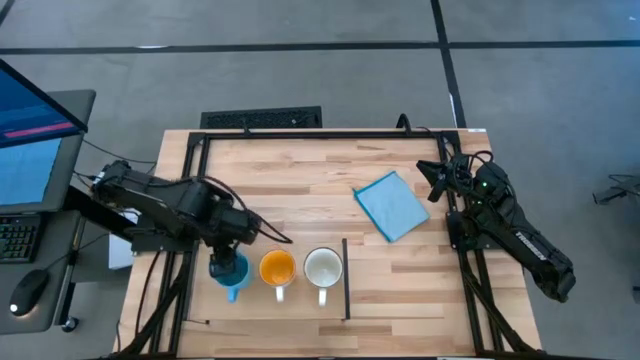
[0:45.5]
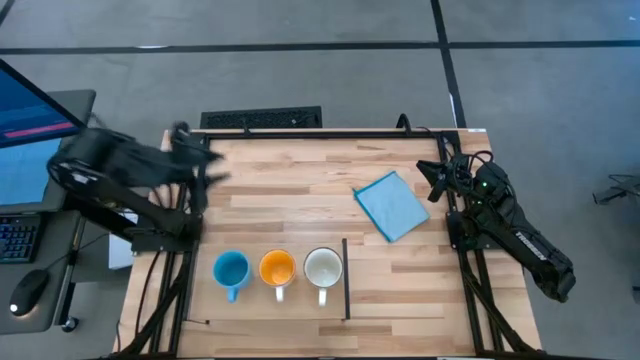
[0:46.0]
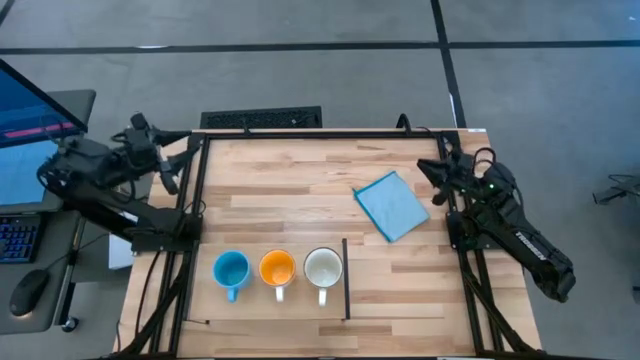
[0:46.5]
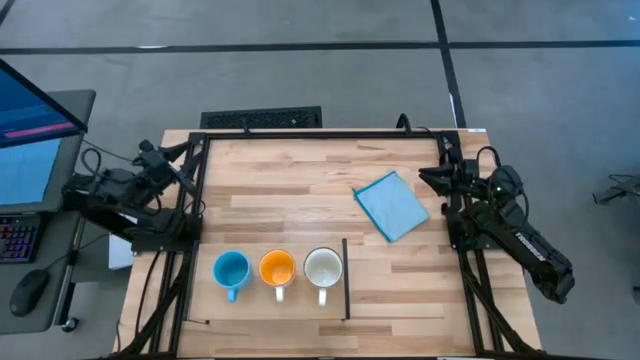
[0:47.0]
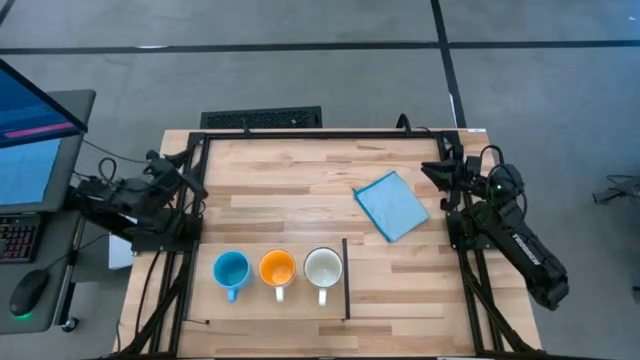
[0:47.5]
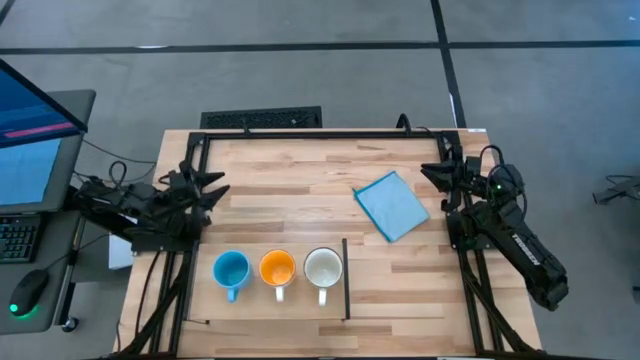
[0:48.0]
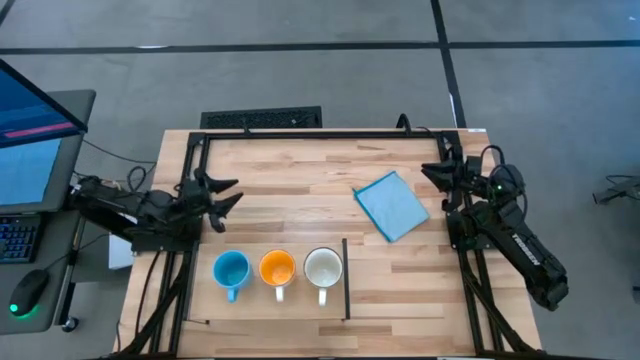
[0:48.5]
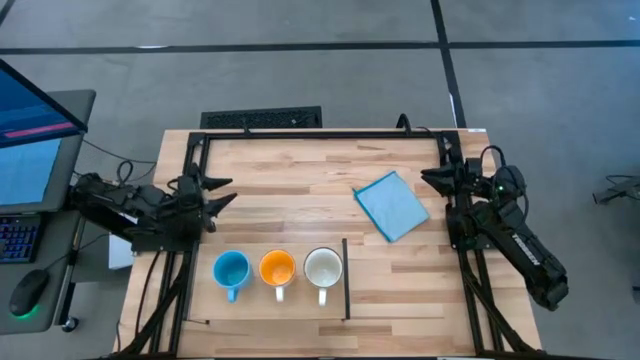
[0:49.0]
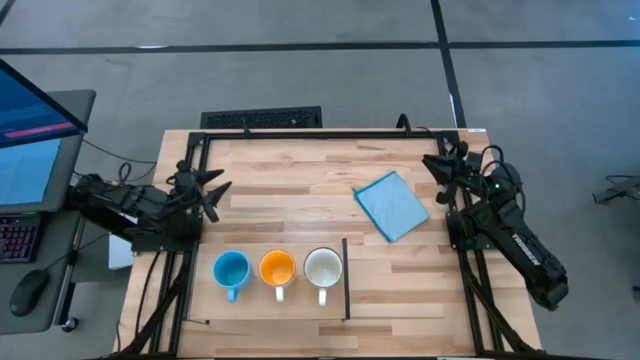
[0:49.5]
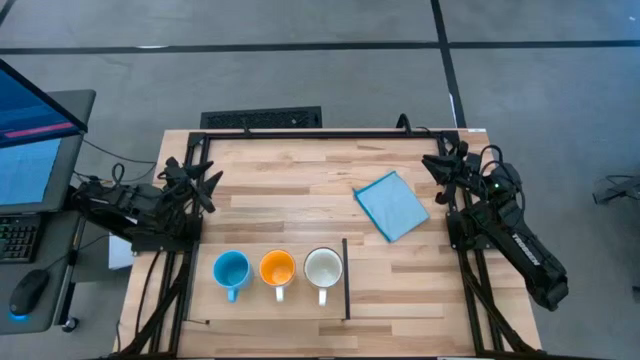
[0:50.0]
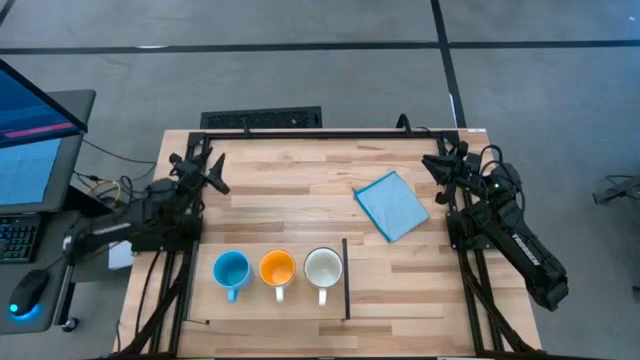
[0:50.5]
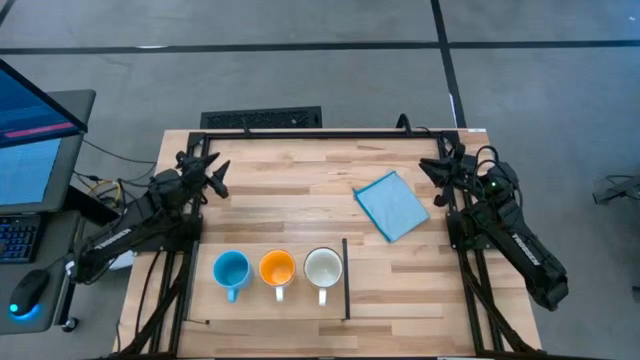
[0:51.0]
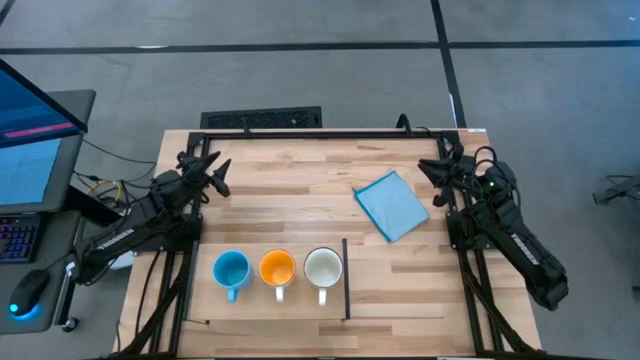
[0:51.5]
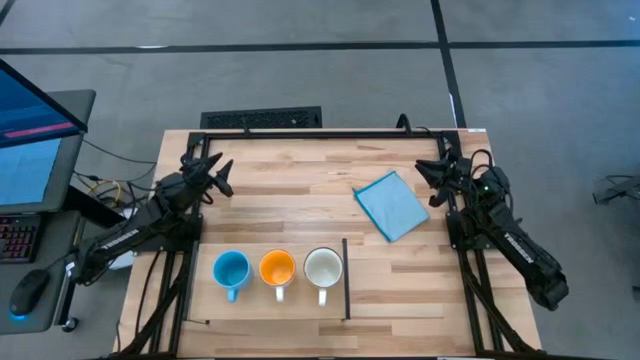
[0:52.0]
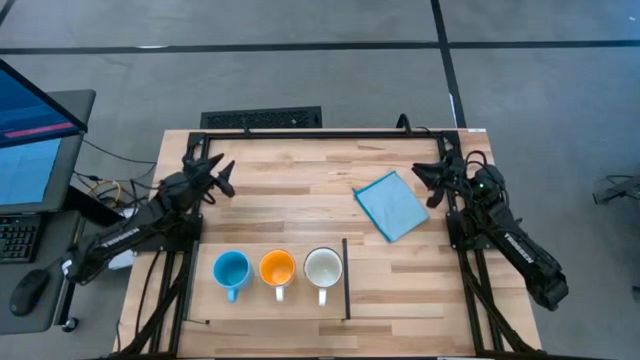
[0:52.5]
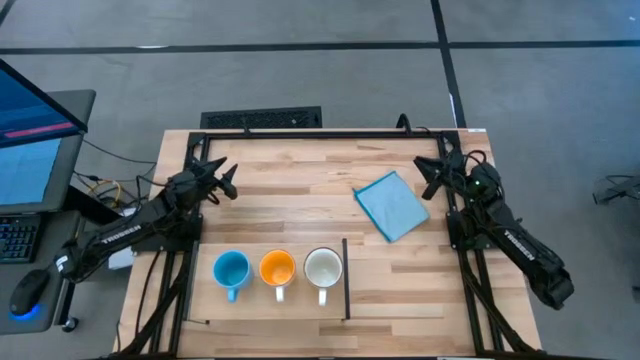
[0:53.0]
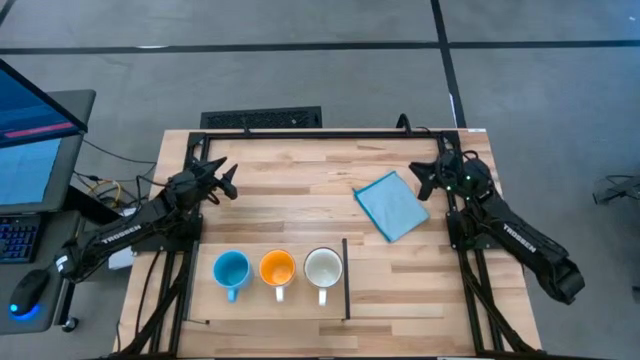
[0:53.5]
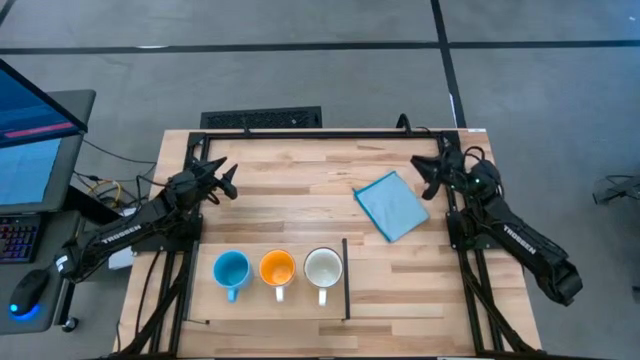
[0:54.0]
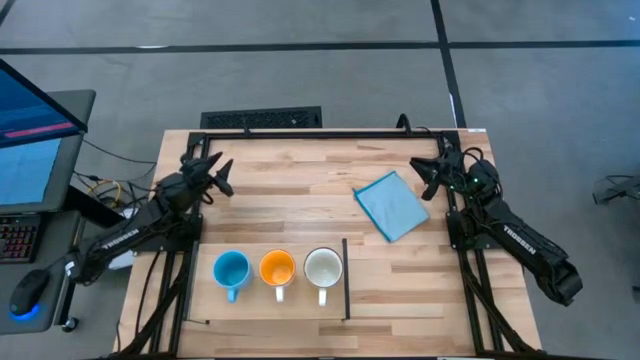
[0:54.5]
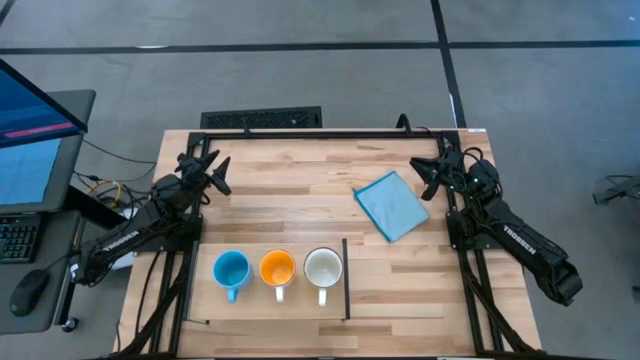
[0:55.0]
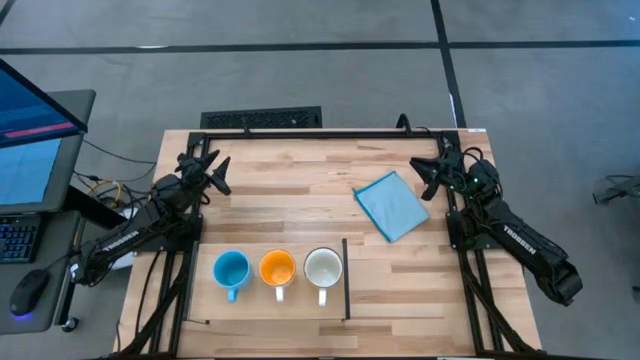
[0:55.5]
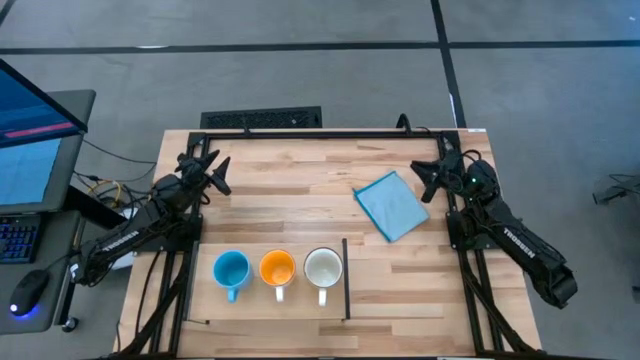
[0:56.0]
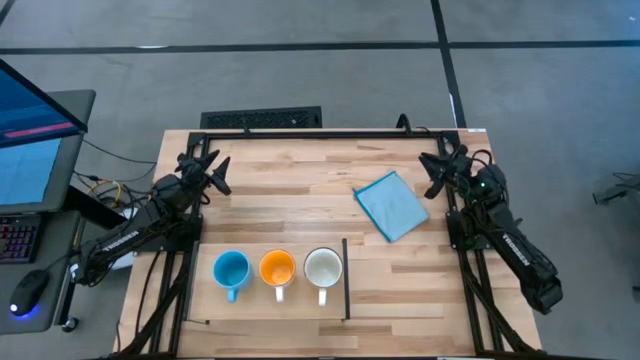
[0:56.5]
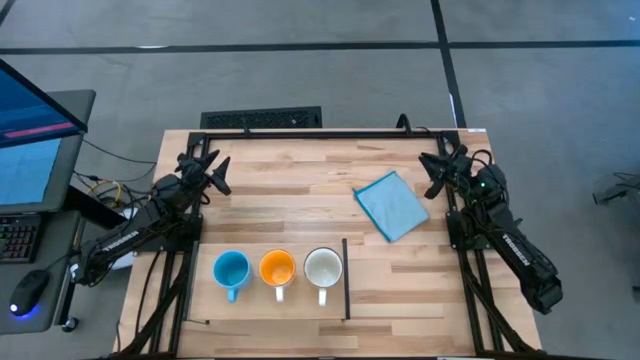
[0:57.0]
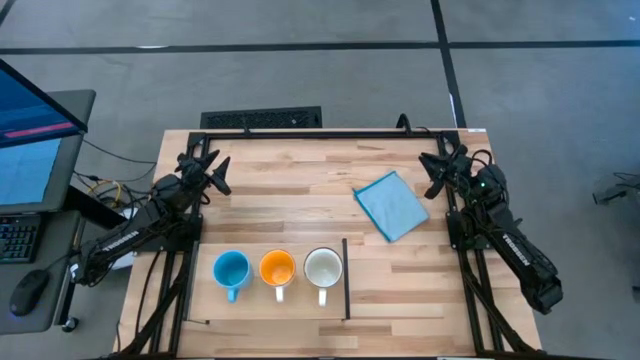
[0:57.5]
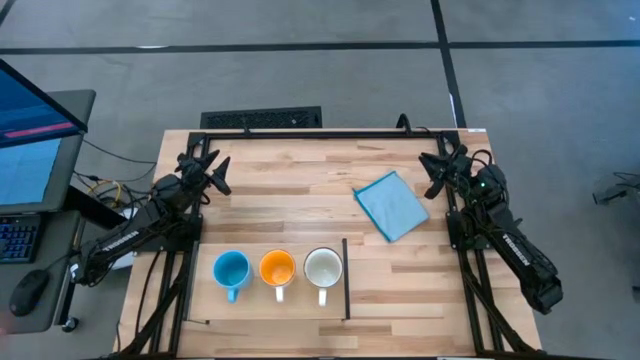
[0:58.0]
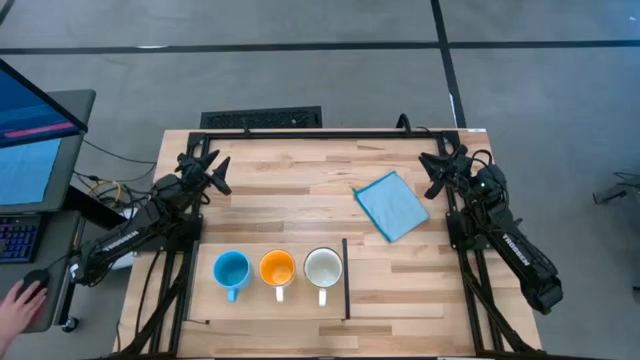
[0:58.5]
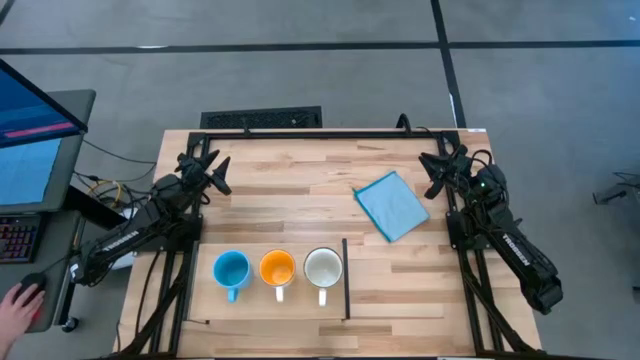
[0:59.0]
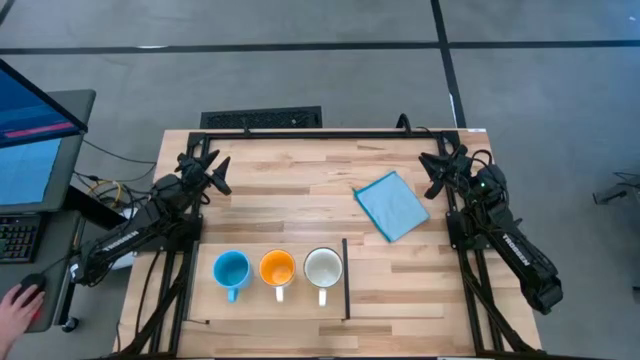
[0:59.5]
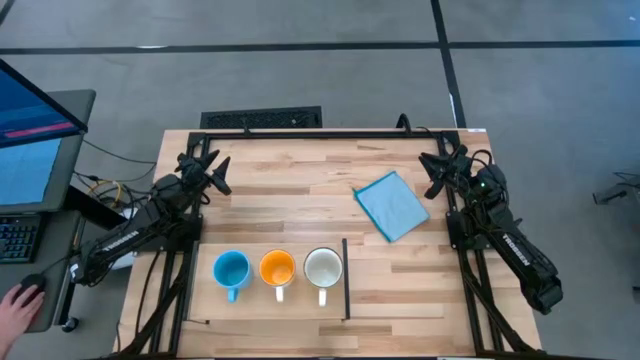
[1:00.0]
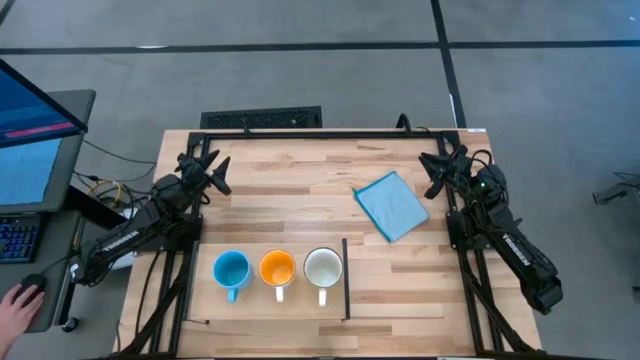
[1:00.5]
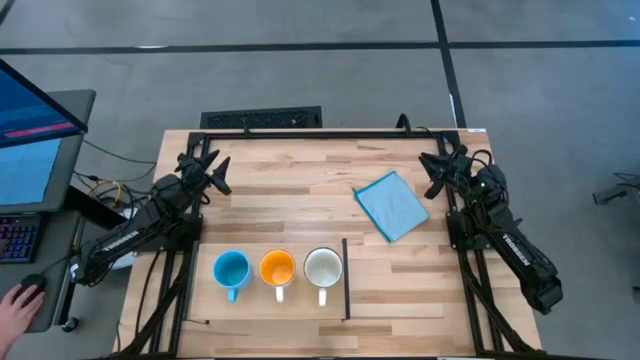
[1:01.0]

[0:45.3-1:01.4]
Task: Stack small to large cups/mugs on shelf
Return to Home Position
